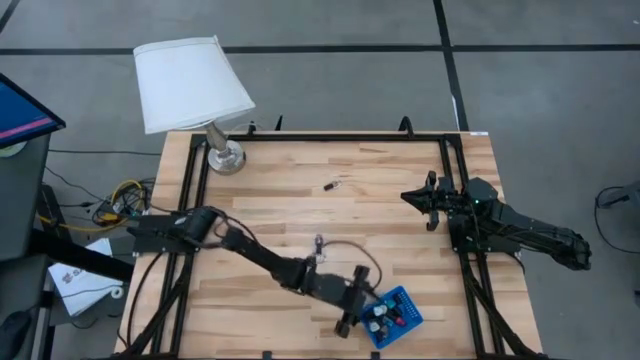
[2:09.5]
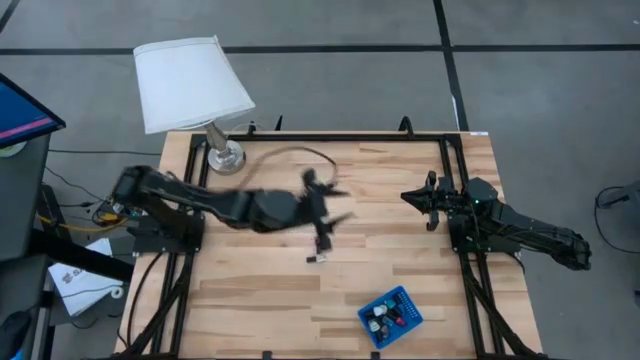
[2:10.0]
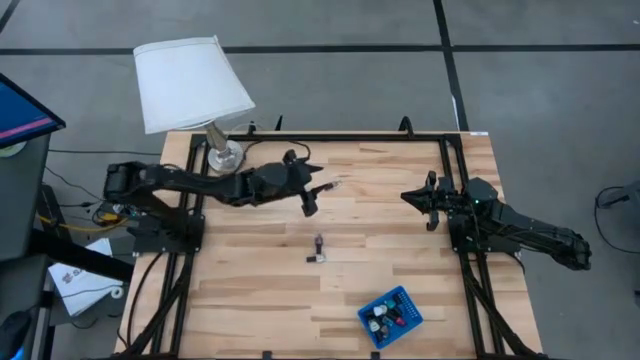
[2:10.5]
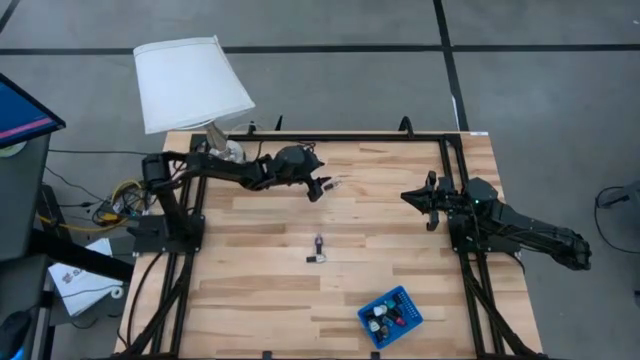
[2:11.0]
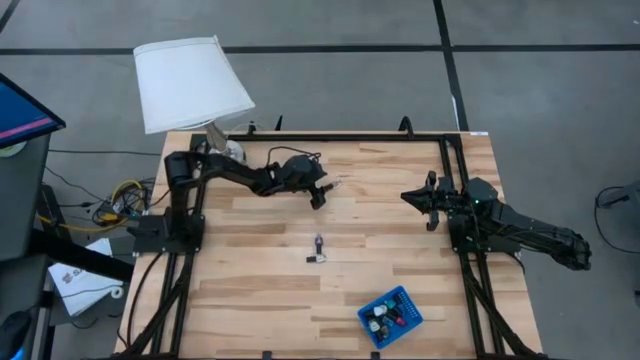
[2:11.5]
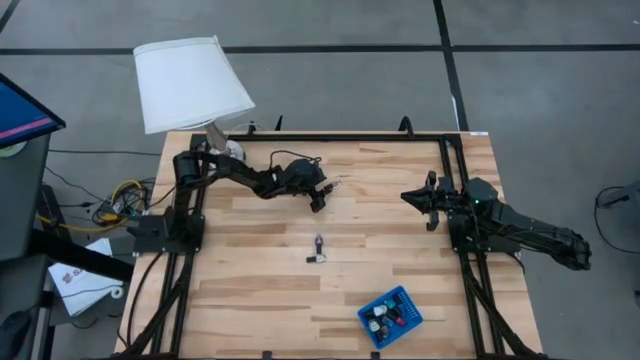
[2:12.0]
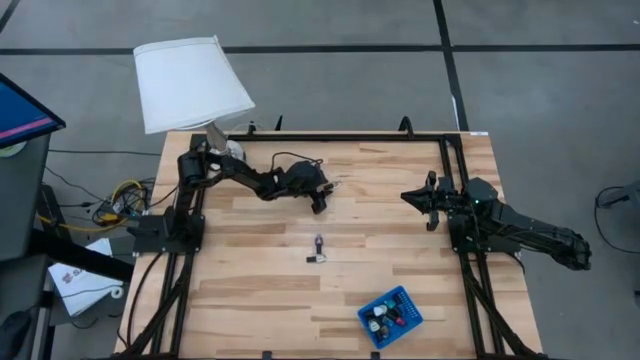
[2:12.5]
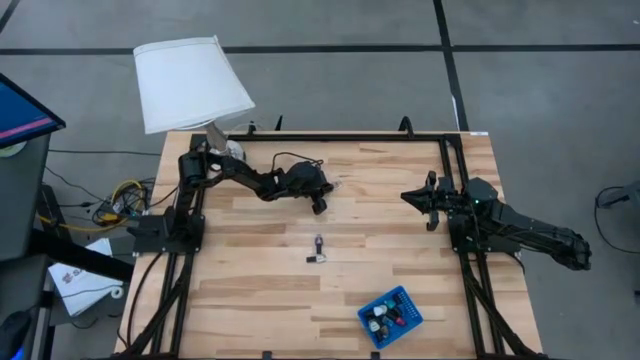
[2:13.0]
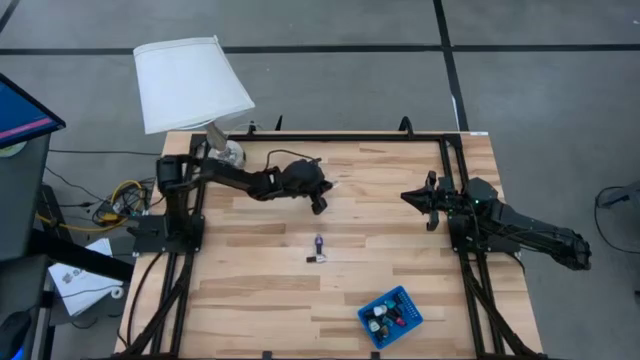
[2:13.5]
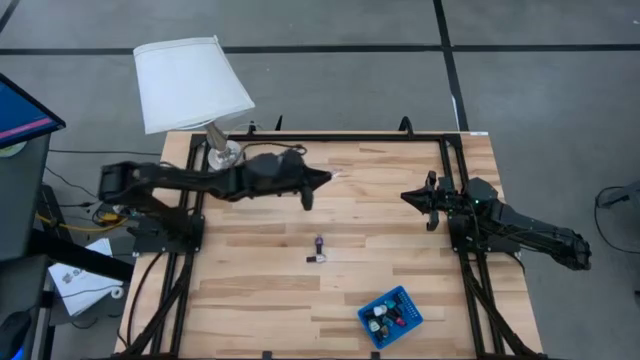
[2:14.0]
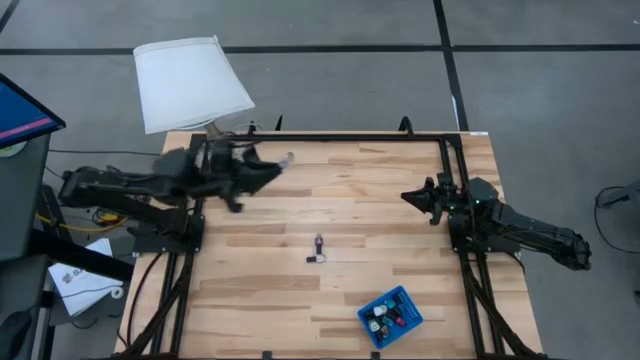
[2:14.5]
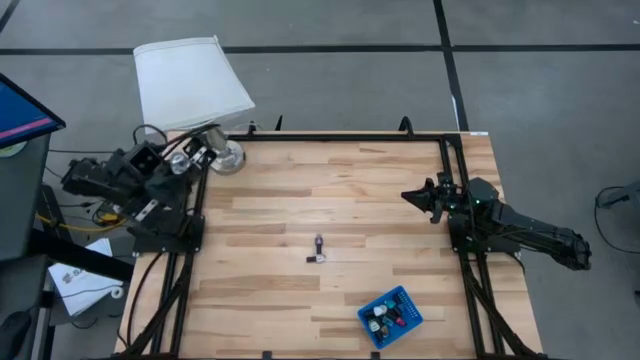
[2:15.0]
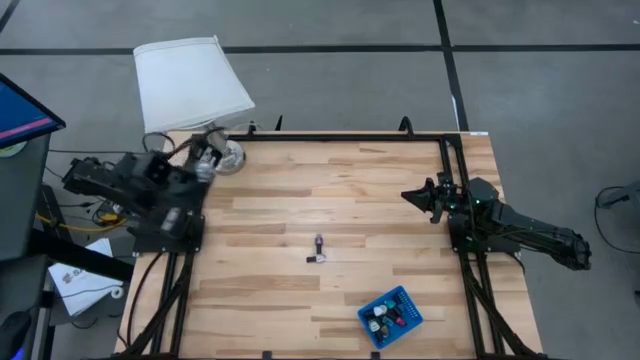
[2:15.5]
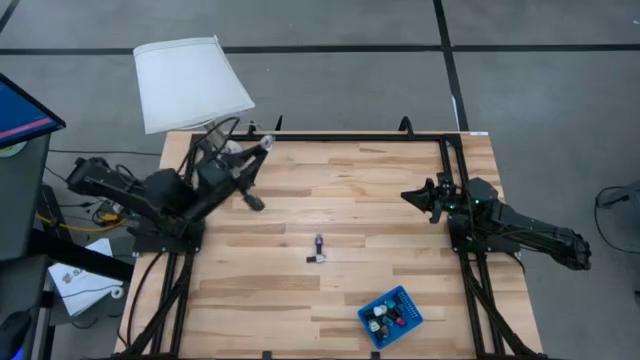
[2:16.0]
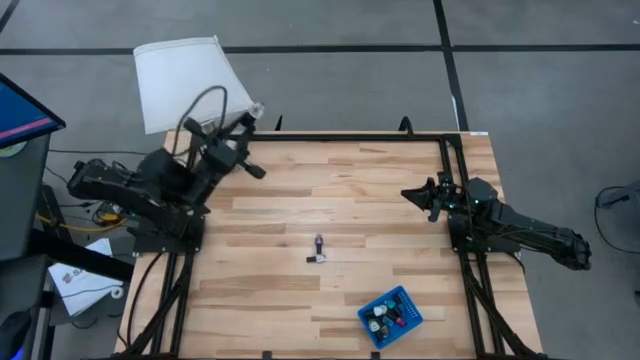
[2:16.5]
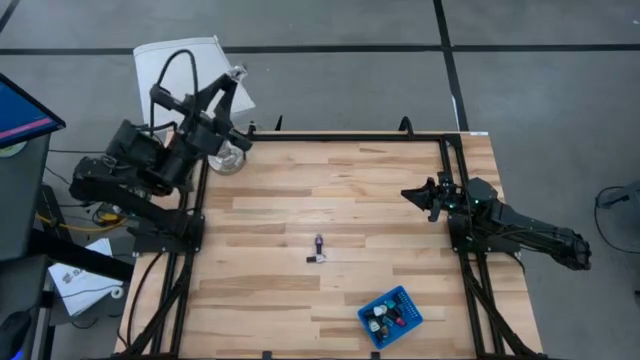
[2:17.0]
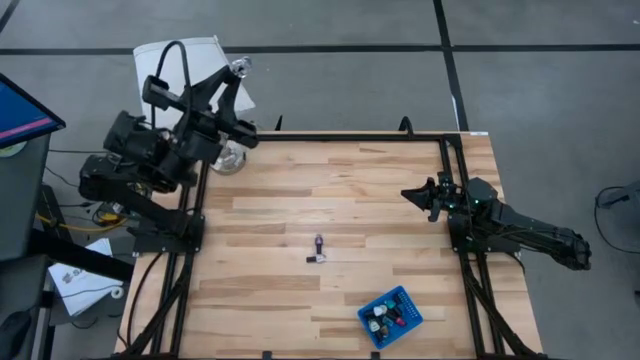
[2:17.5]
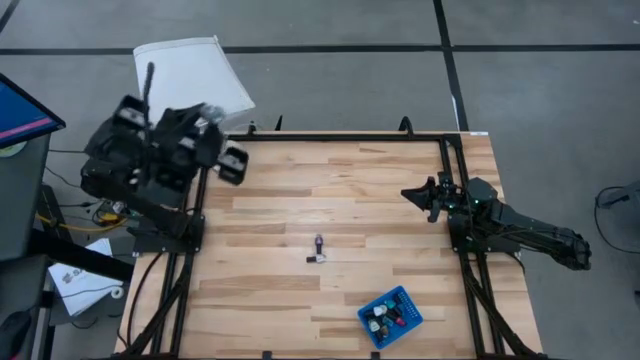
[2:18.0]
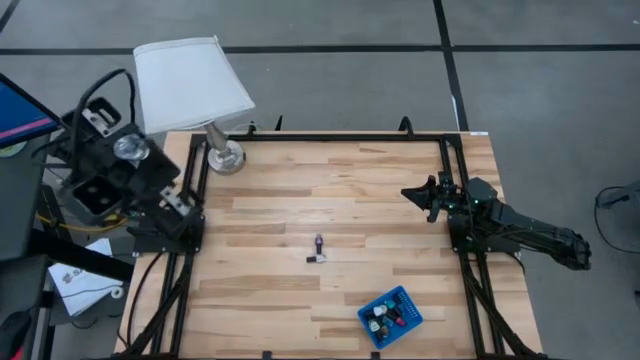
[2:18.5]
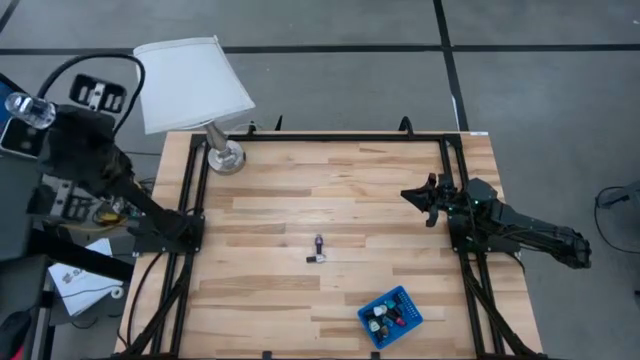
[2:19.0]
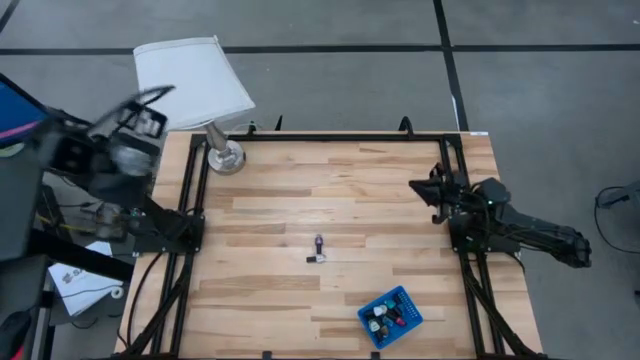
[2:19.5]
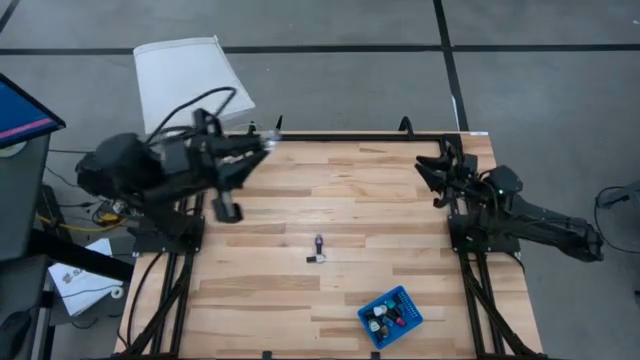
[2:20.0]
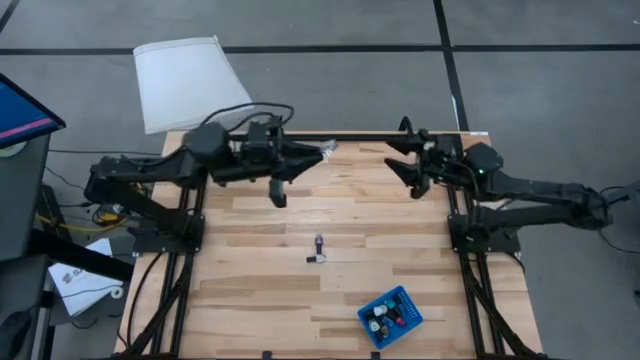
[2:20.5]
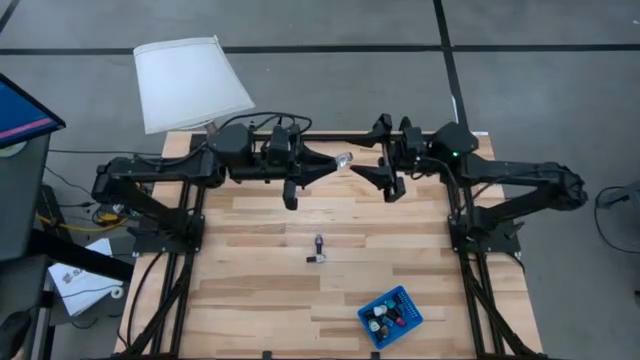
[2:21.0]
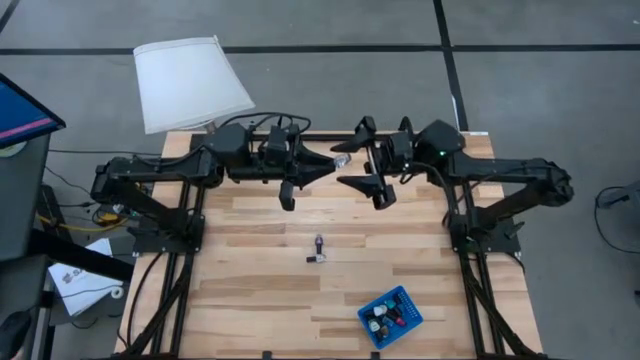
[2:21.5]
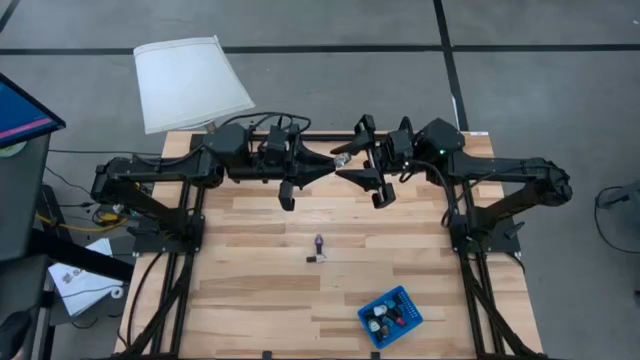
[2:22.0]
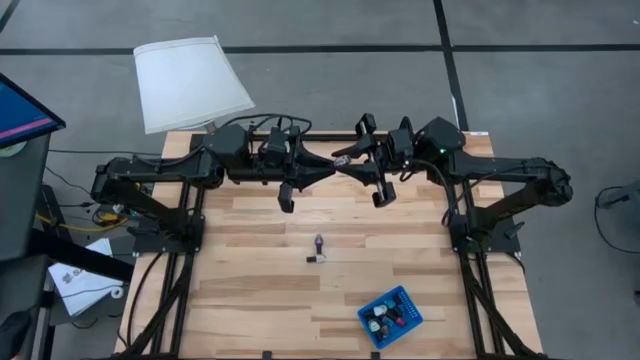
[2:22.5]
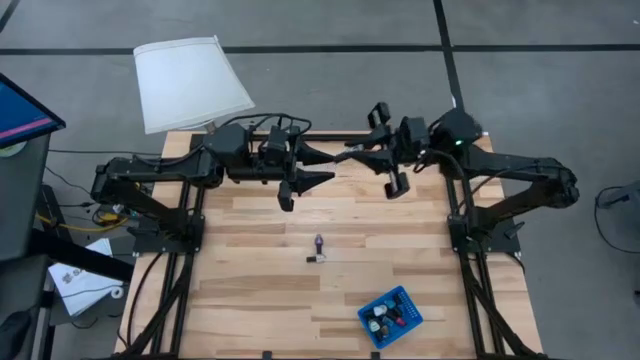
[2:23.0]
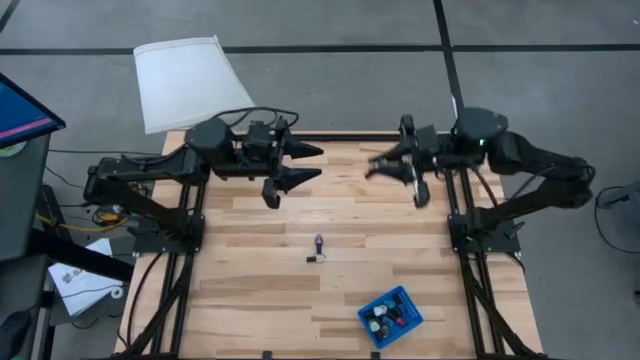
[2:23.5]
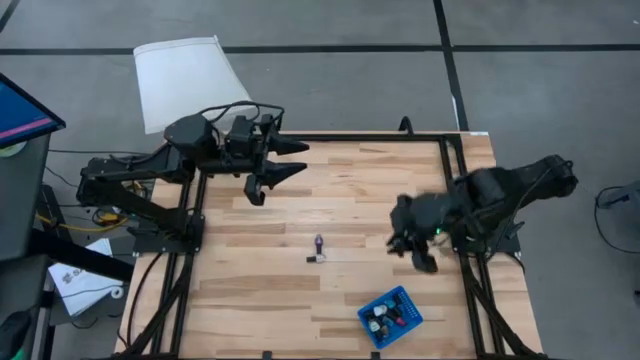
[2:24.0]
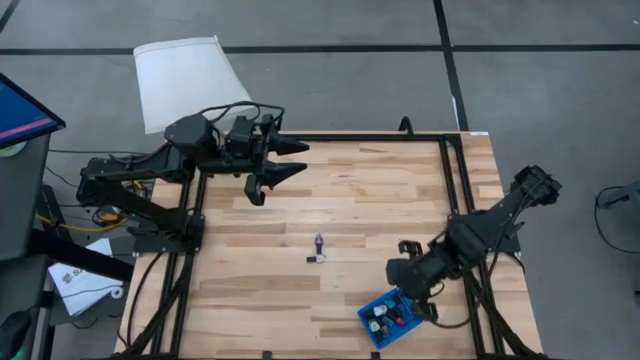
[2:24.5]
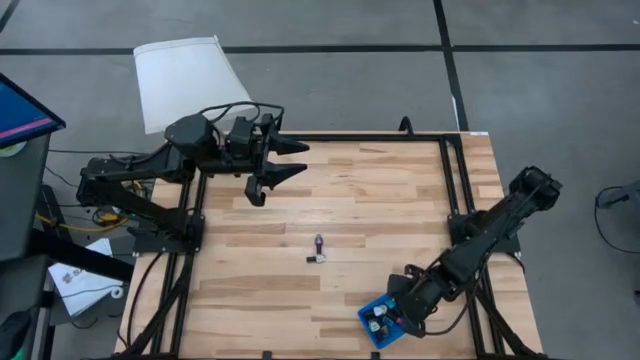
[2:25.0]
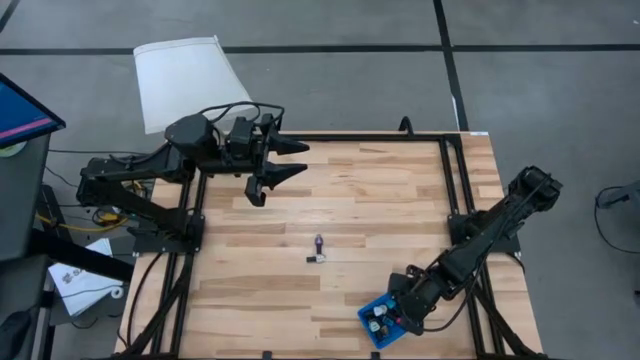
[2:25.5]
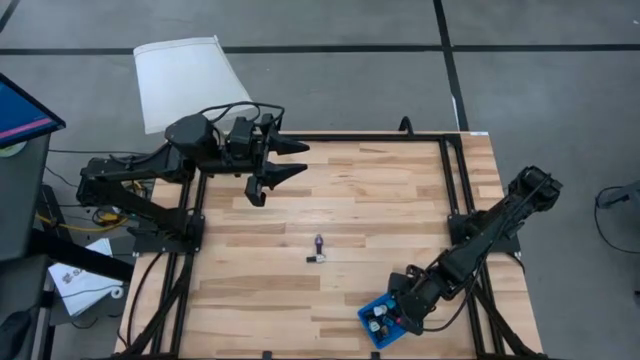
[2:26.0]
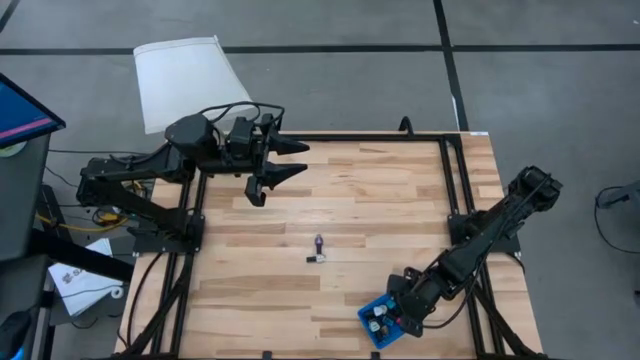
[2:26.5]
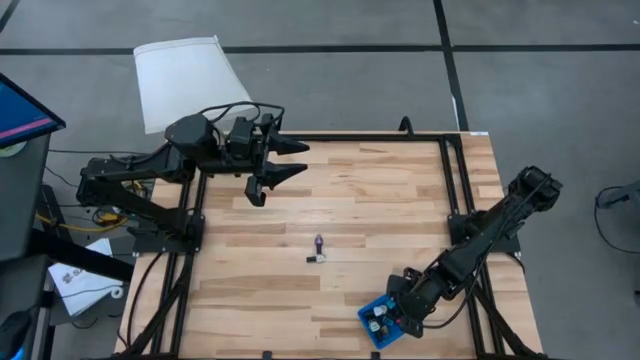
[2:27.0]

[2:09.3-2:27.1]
Task: Pick & Place Nail Polish
Put the transparent nail polish into the blue bin

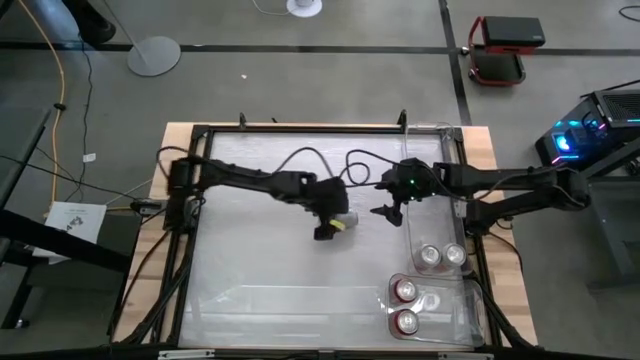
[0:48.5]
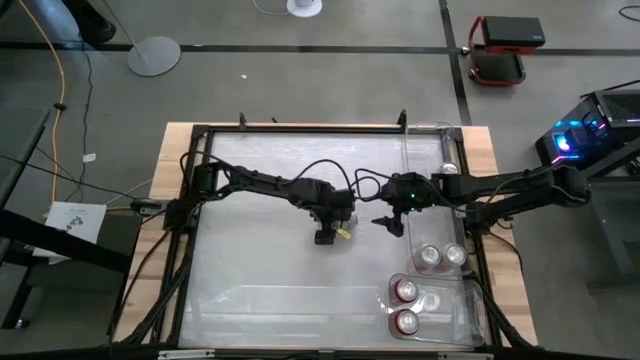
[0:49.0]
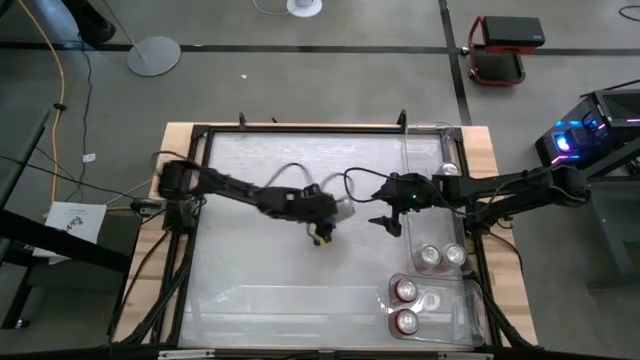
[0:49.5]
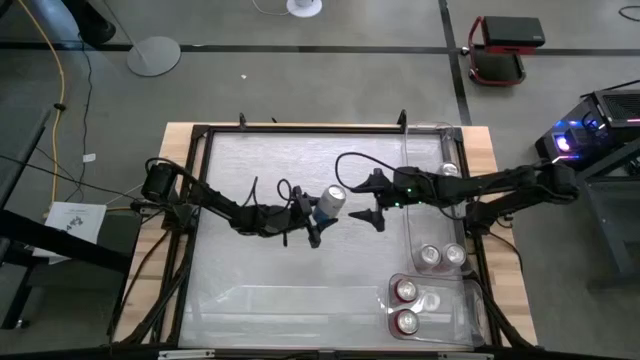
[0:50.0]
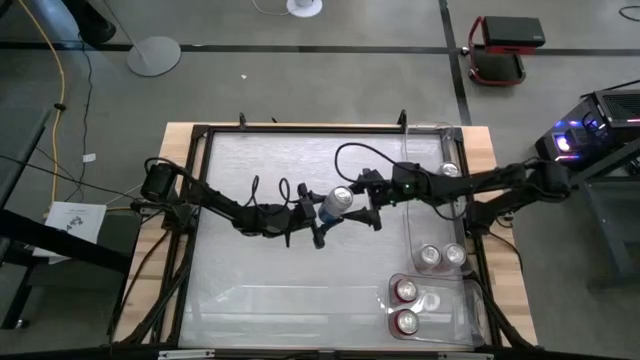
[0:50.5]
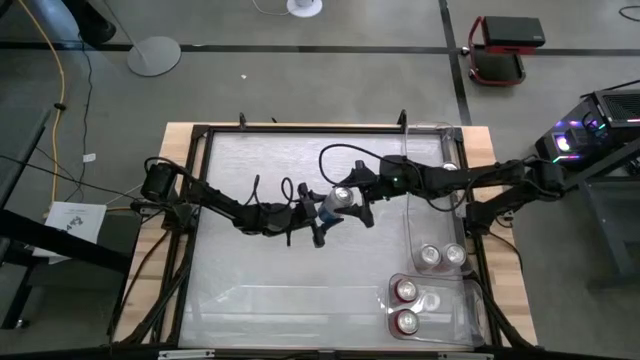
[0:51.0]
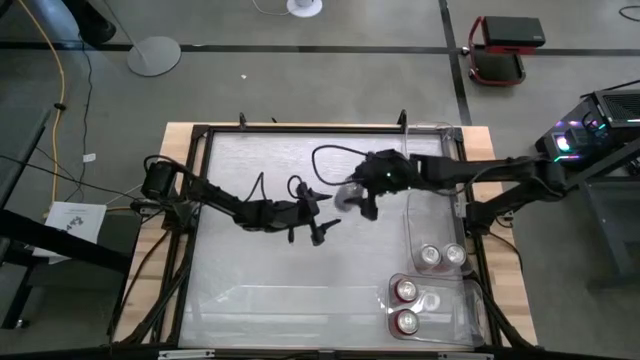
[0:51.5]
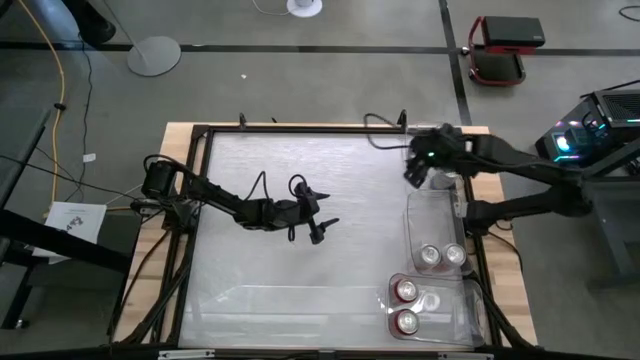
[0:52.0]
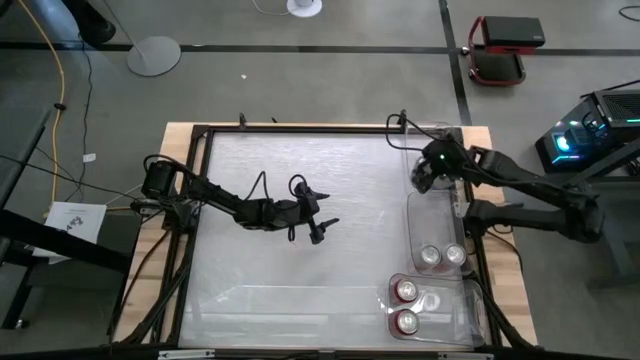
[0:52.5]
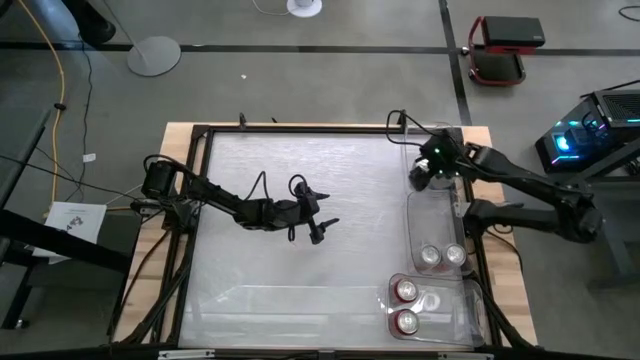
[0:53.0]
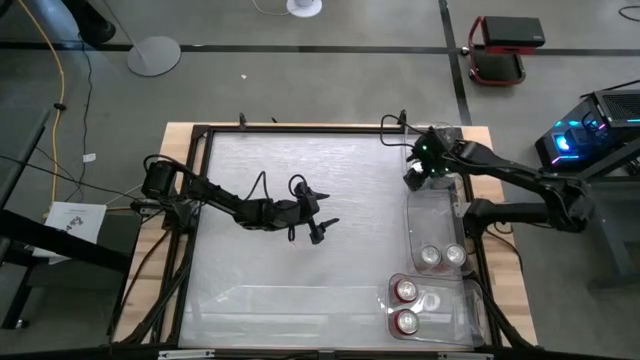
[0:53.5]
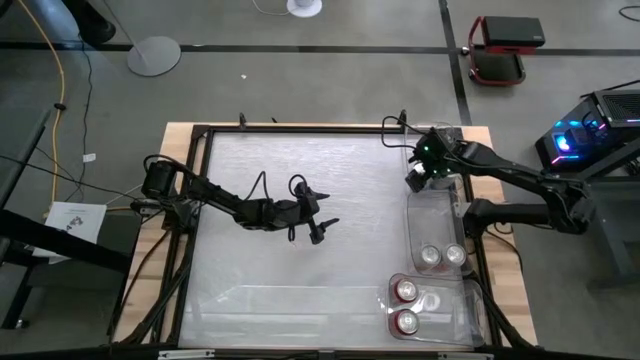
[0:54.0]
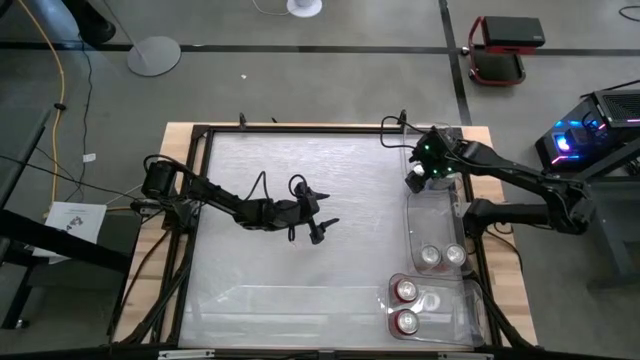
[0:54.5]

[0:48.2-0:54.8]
Task: Sort soda cans
Put the blue-white soda can into the top transparent bin
